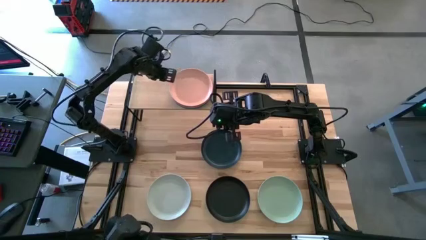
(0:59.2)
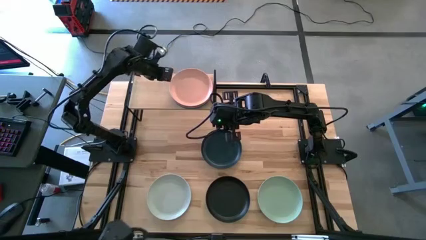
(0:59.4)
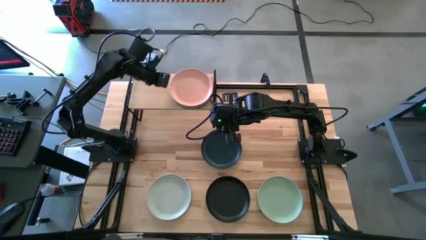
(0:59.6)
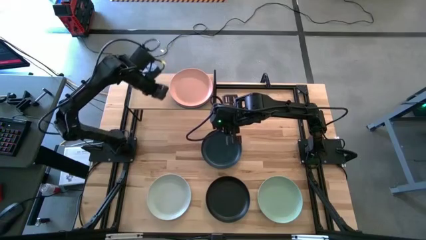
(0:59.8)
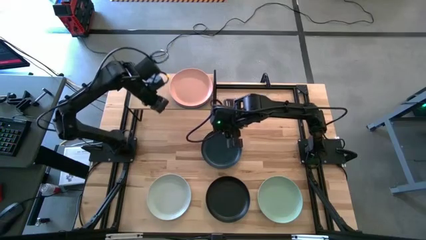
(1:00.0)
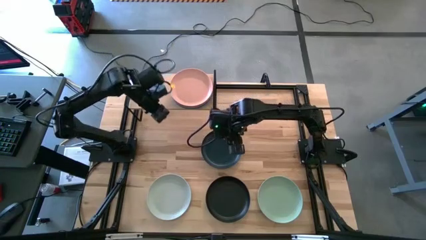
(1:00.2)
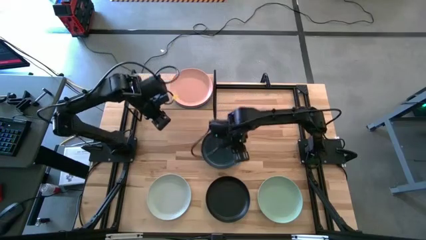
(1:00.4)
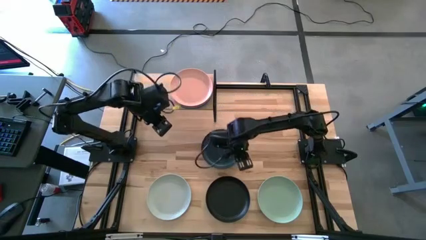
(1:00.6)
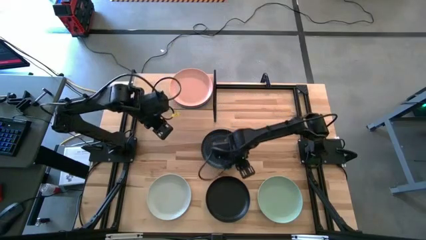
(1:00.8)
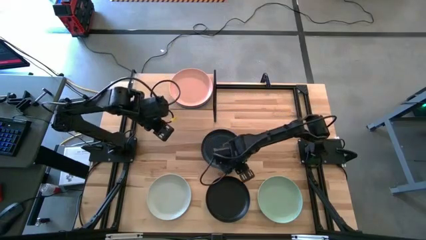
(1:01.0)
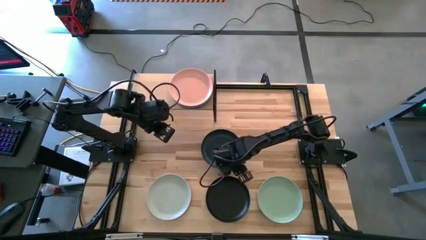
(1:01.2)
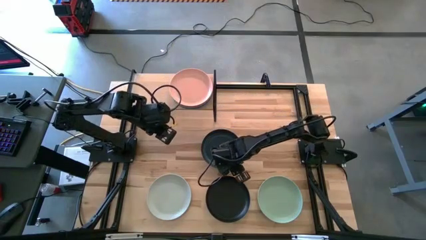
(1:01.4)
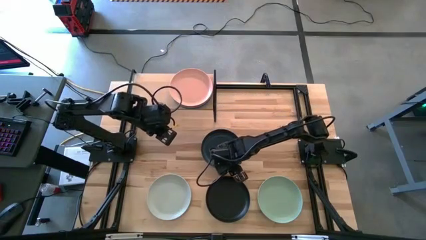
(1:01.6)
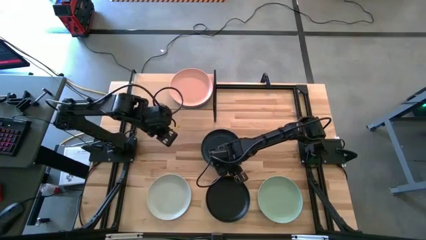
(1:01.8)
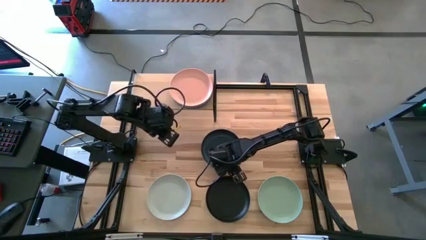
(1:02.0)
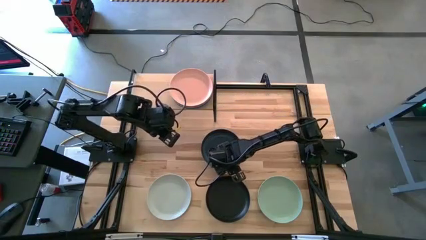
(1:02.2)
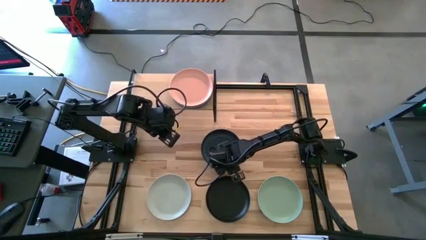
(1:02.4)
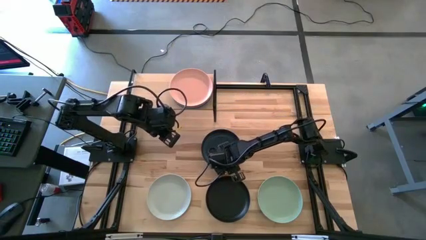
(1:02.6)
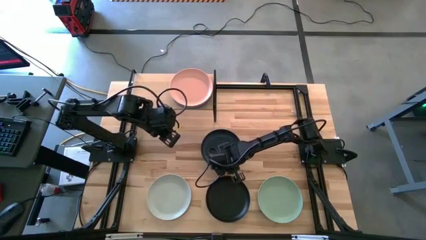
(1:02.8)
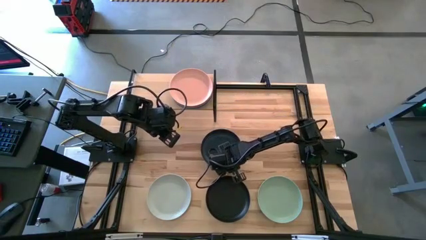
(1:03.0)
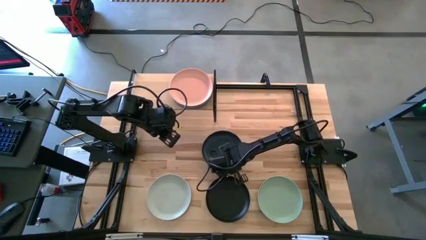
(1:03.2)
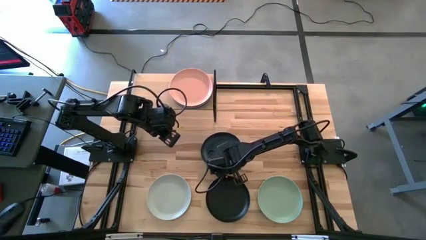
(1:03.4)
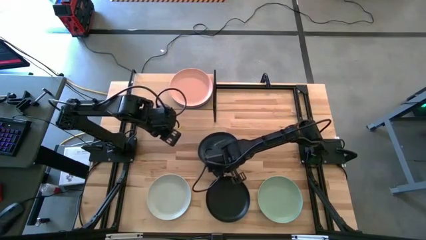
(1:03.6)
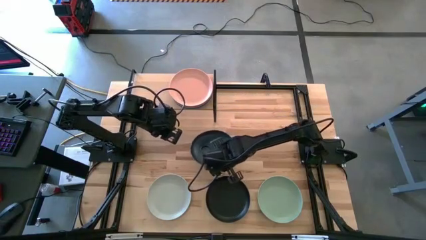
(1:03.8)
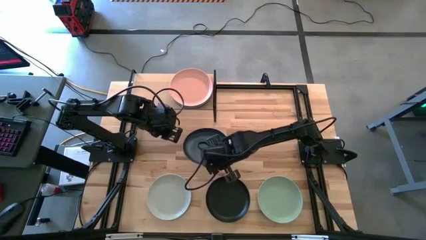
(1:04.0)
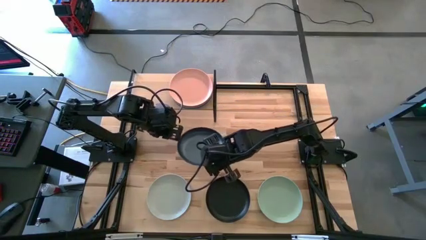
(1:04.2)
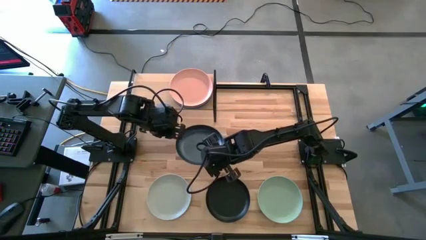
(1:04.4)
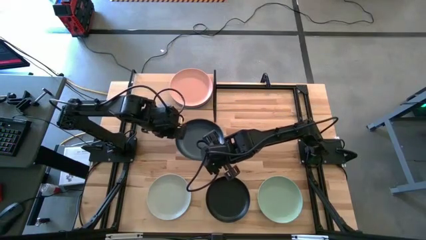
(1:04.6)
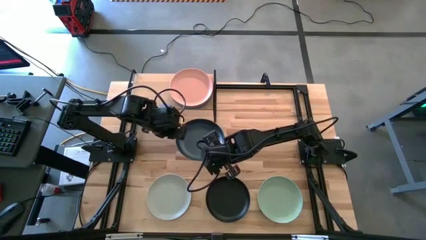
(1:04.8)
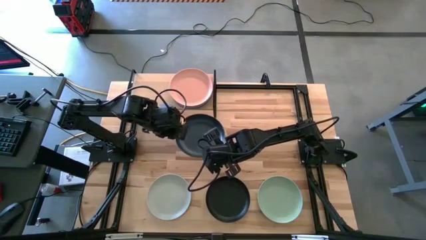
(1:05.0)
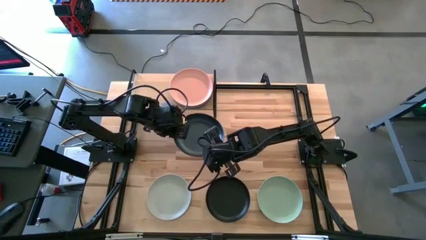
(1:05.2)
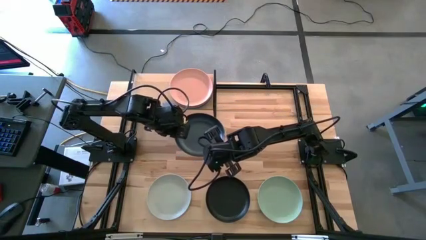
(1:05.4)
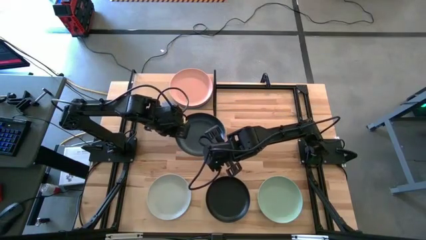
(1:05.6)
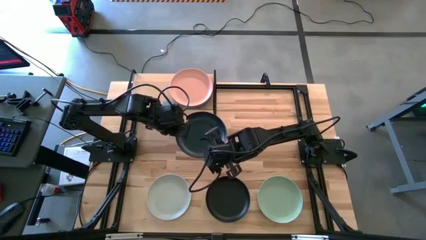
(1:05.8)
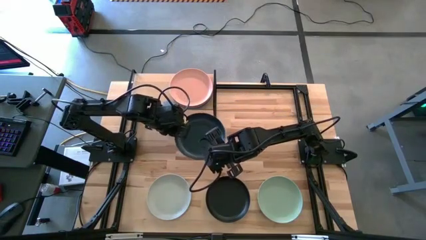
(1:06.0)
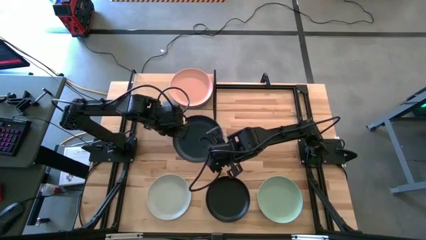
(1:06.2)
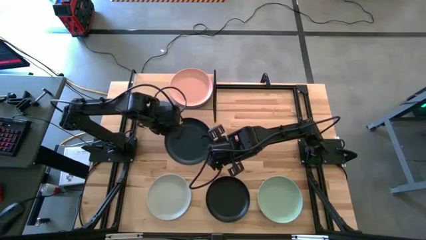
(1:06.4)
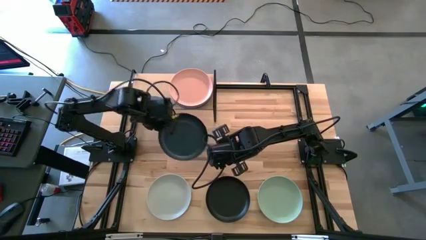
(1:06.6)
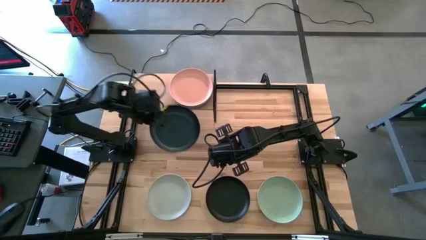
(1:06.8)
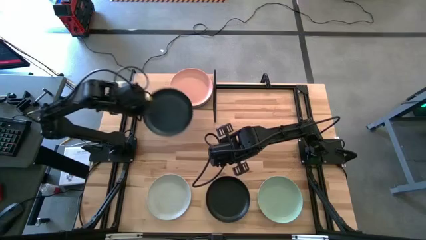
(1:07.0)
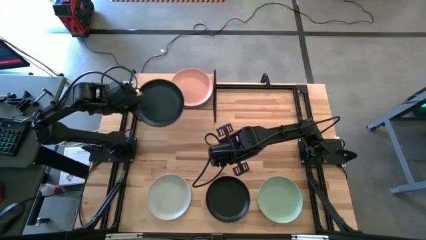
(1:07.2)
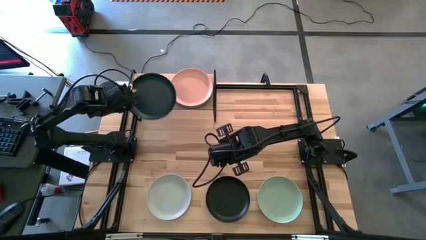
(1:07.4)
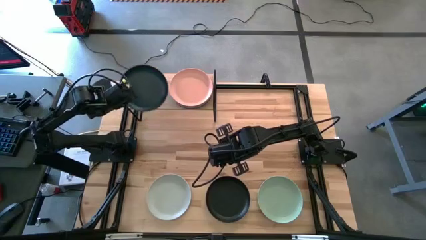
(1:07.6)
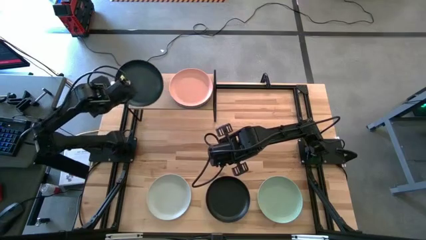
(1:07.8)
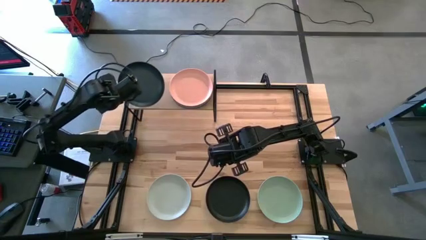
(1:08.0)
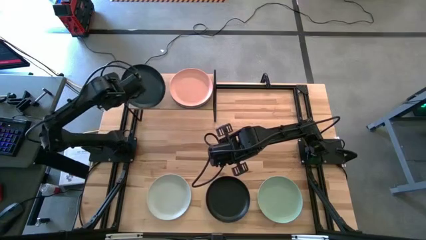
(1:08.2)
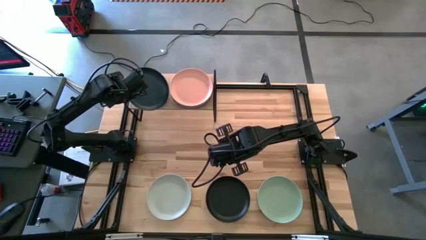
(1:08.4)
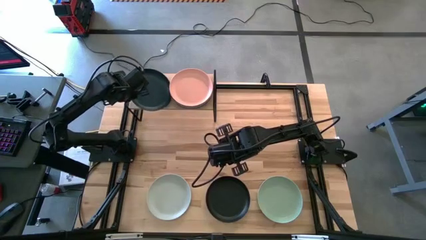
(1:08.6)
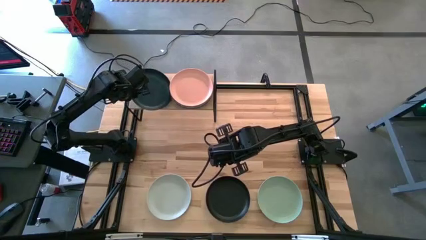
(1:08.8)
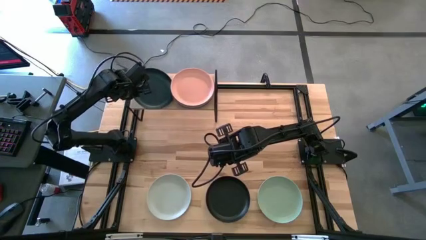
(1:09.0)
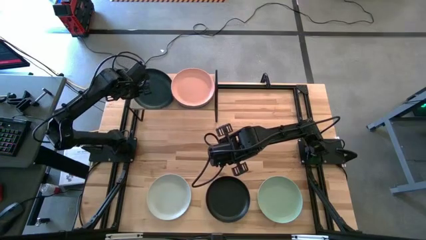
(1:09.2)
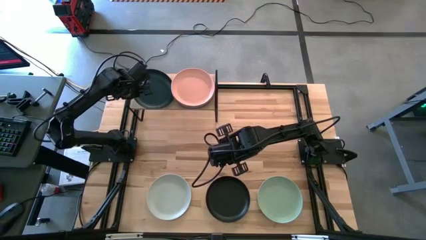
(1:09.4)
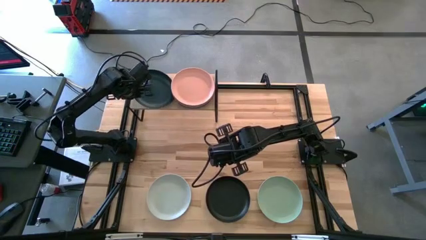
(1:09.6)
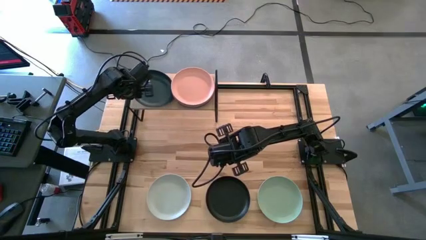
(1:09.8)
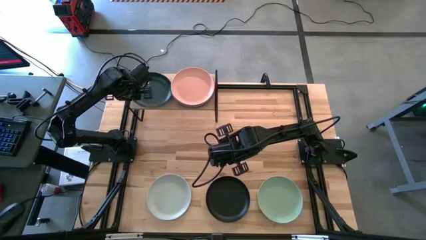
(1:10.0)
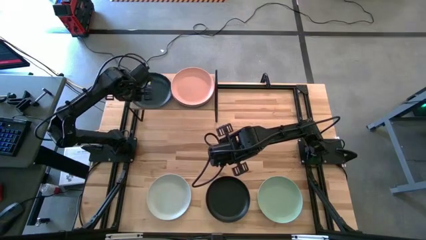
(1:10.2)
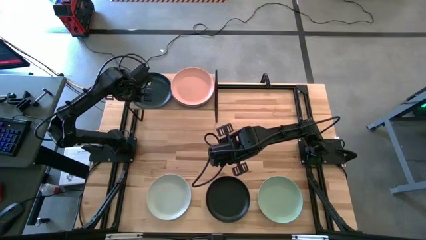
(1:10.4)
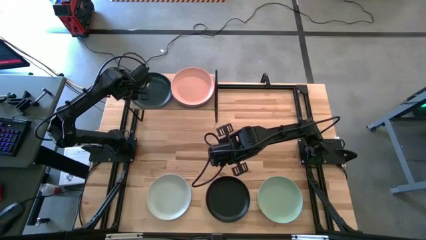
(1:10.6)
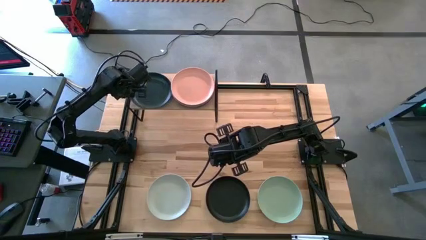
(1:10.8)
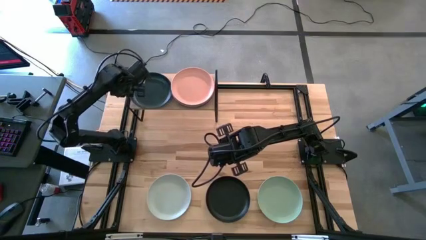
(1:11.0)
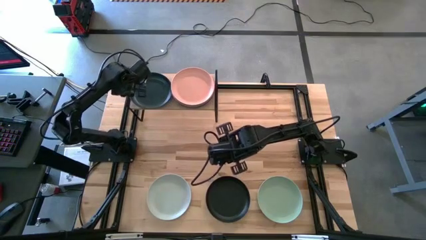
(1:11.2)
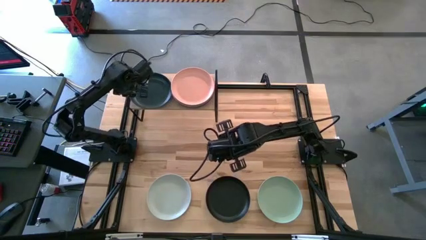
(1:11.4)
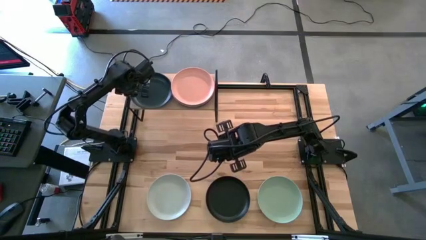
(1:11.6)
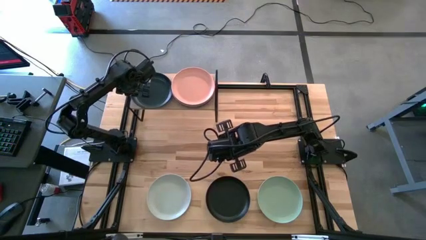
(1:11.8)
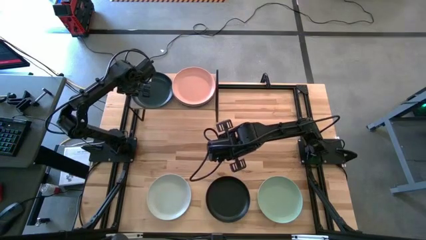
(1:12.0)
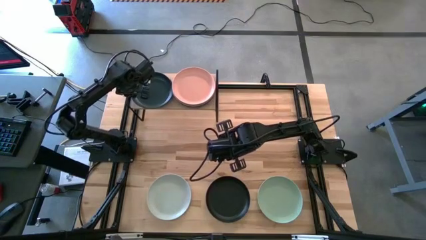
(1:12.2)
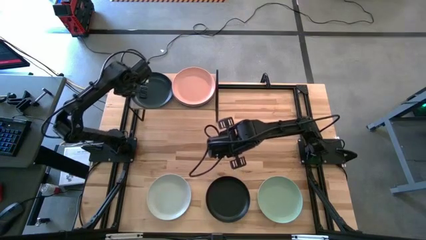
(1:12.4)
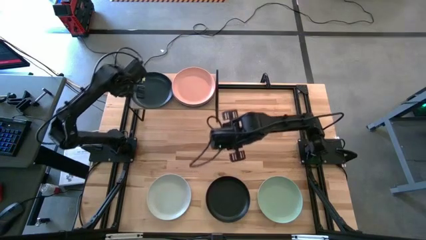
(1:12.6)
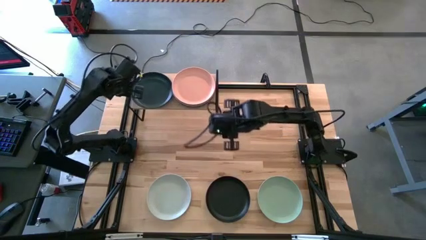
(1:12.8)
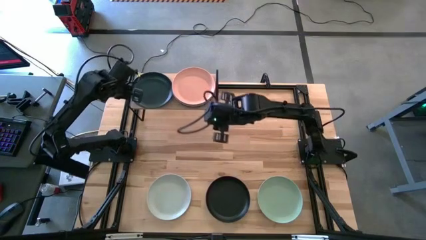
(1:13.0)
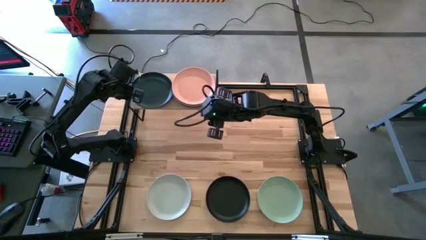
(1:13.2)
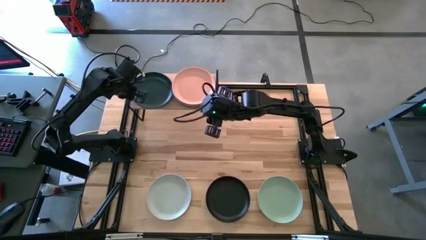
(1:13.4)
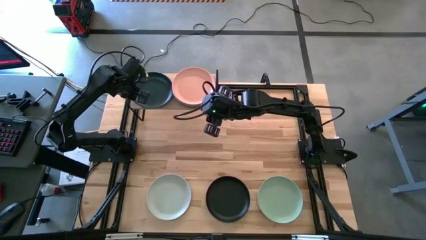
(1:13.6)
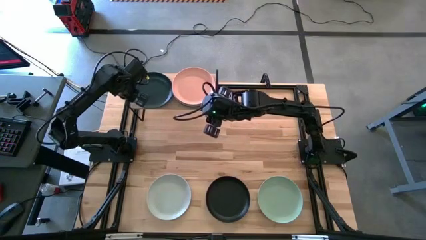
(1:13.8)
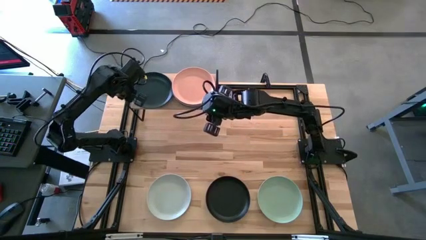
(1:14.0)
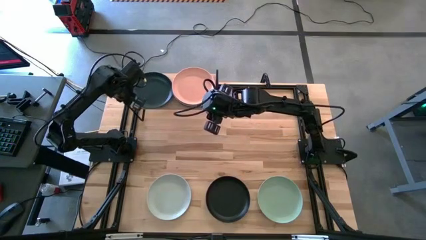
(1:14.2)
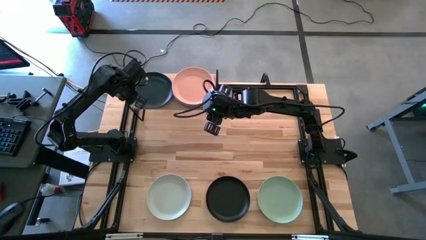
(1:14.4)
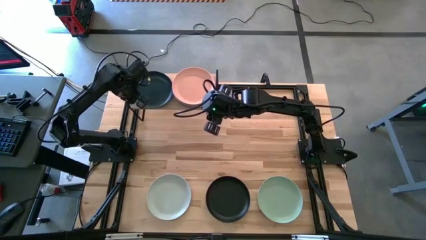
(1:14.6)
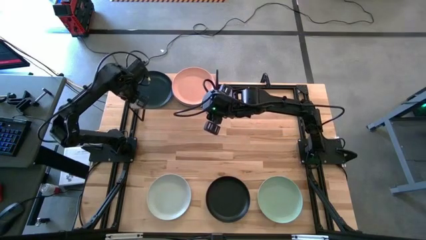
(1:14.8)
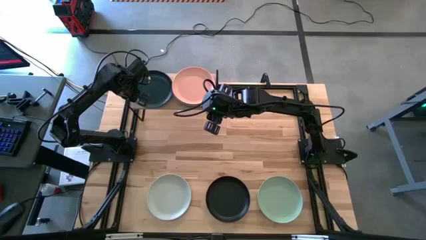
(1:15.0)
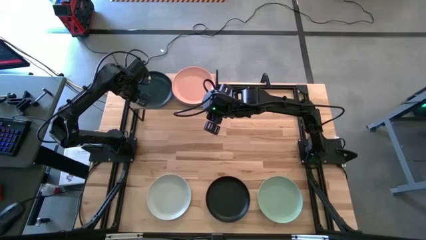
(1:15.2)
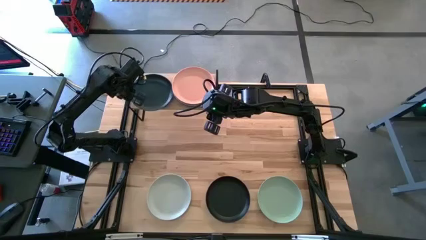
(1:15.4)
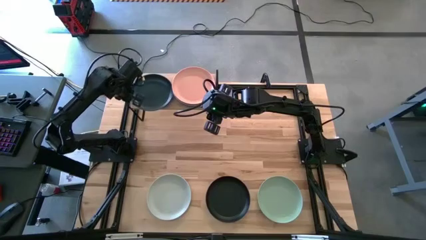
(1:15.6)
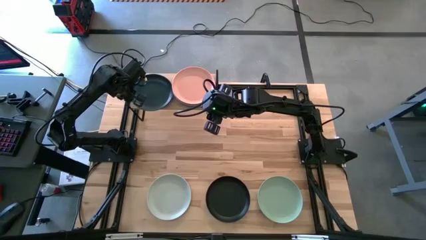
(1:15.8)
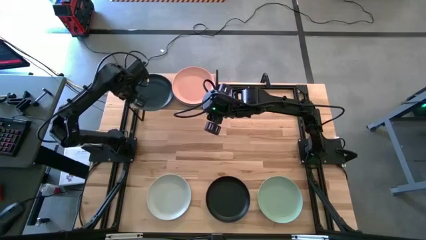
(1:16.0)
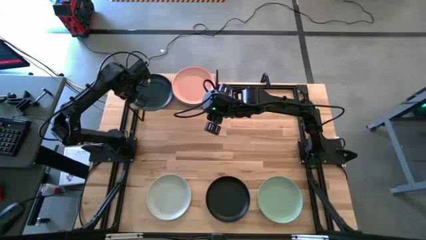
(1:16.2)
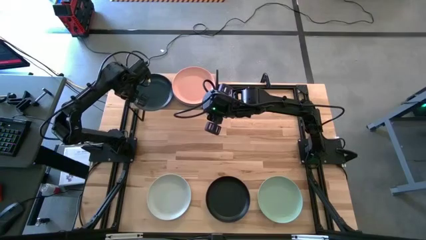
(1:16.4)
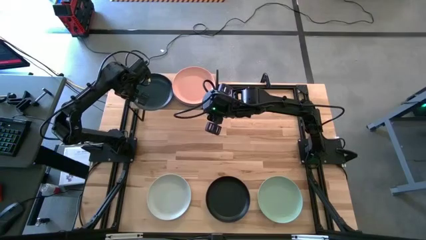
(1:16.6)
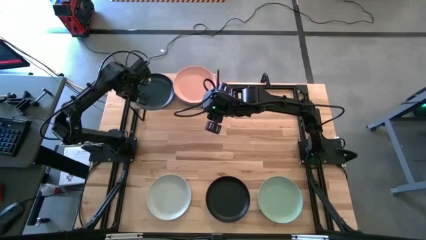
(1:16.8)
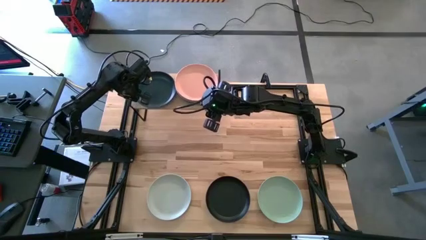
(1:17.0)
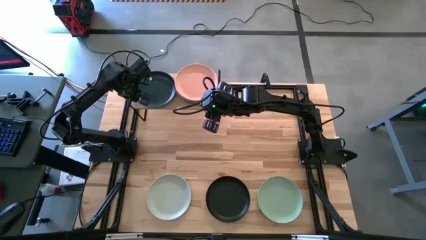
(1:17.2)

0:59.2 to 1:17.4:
Task: Place and stack plates onto a shelf
Put the dark blue plate on the shelf
